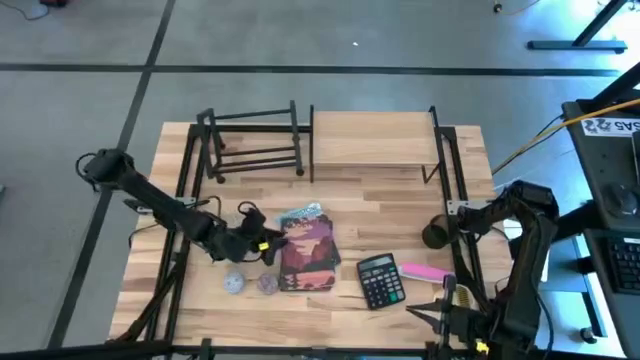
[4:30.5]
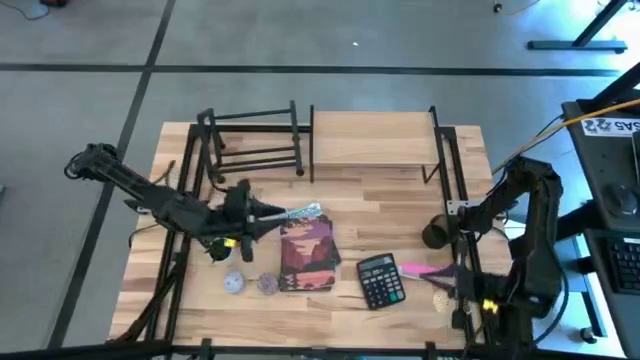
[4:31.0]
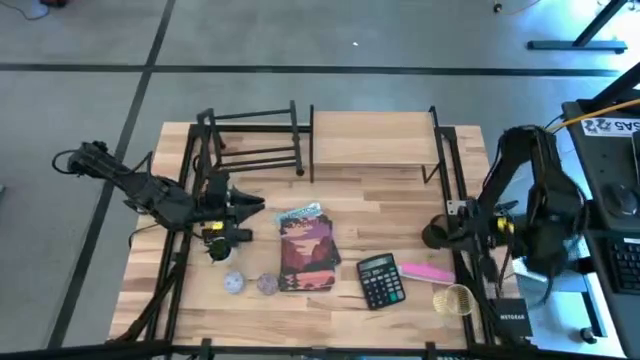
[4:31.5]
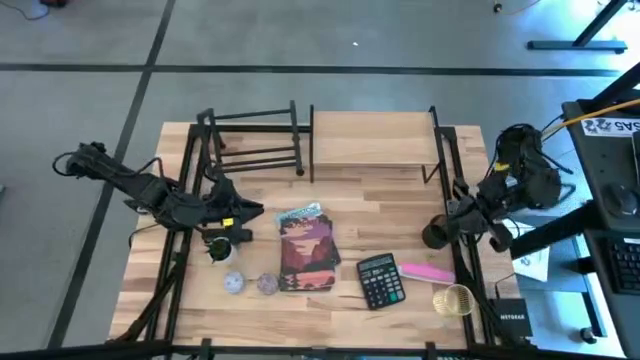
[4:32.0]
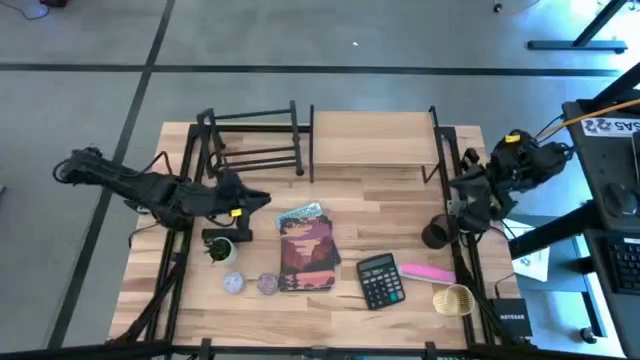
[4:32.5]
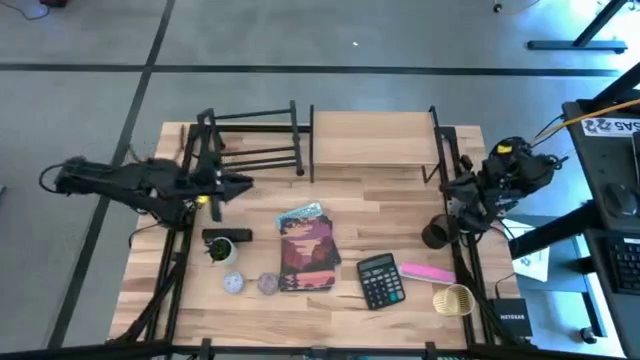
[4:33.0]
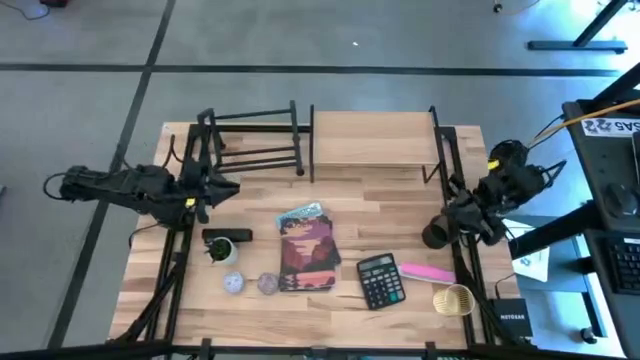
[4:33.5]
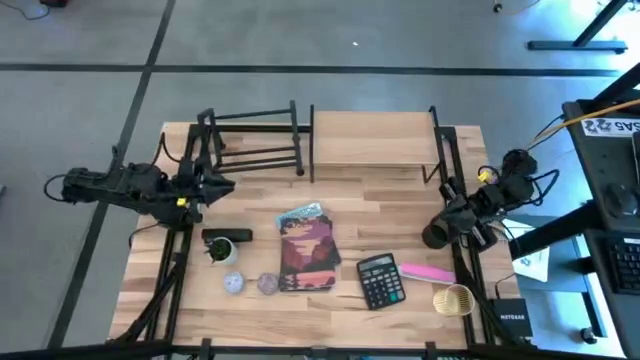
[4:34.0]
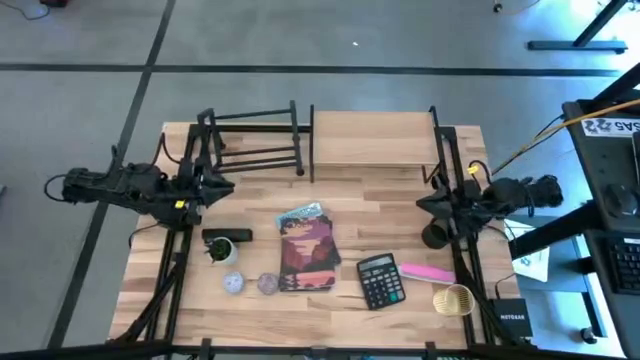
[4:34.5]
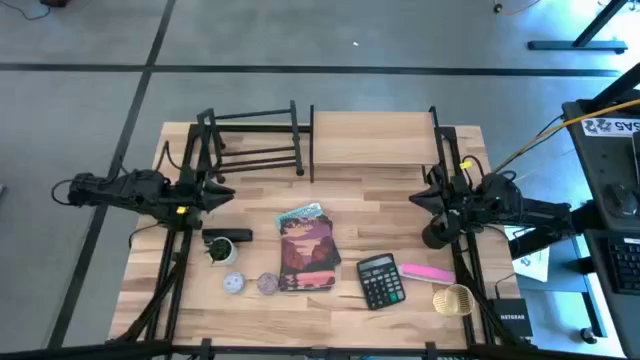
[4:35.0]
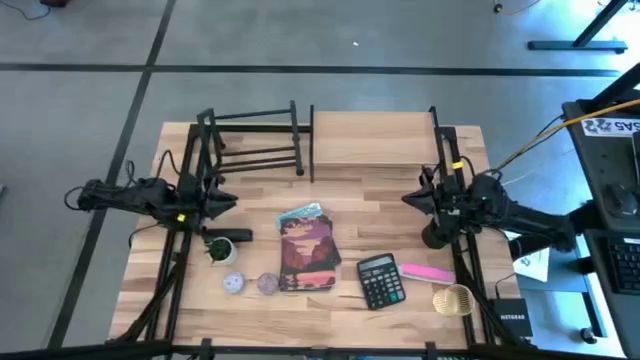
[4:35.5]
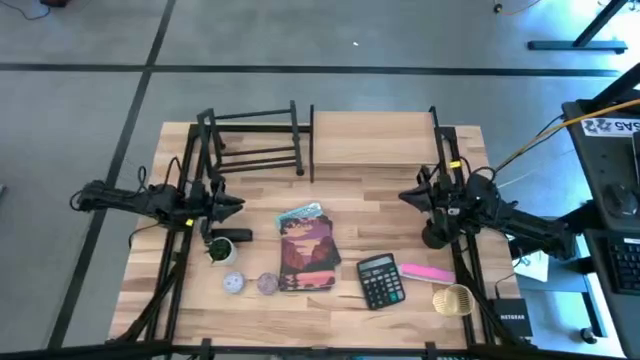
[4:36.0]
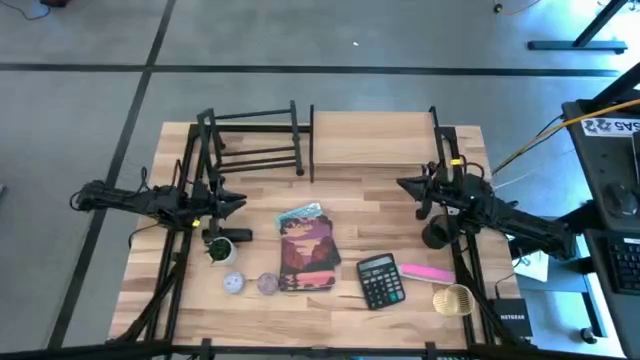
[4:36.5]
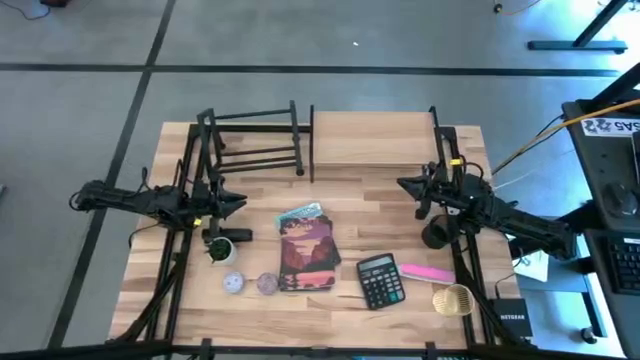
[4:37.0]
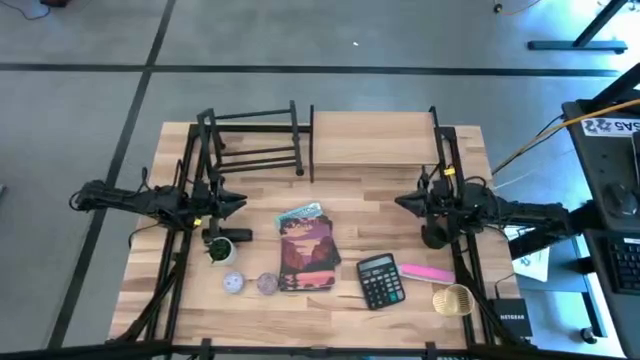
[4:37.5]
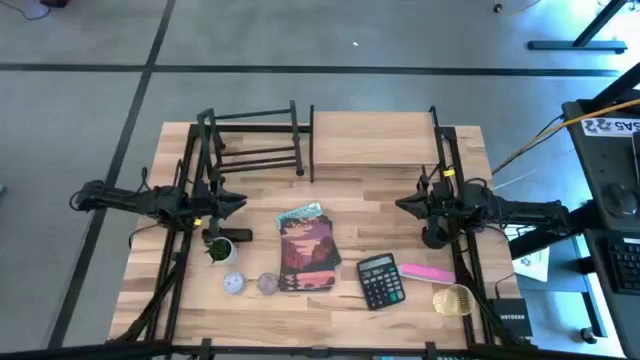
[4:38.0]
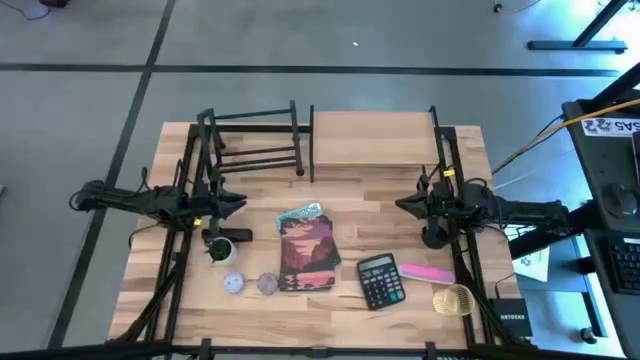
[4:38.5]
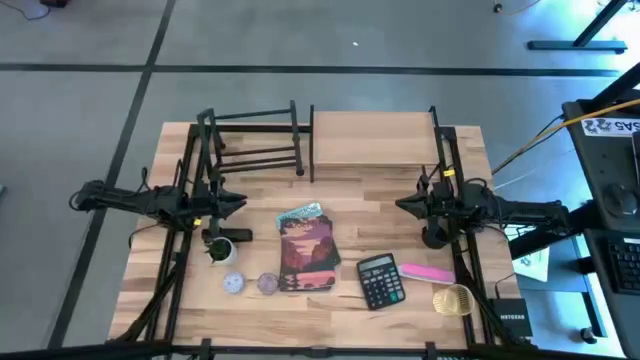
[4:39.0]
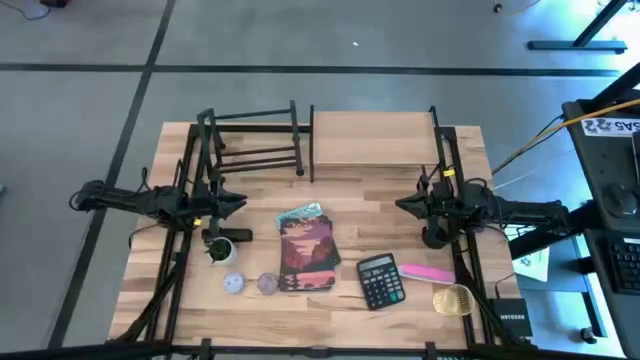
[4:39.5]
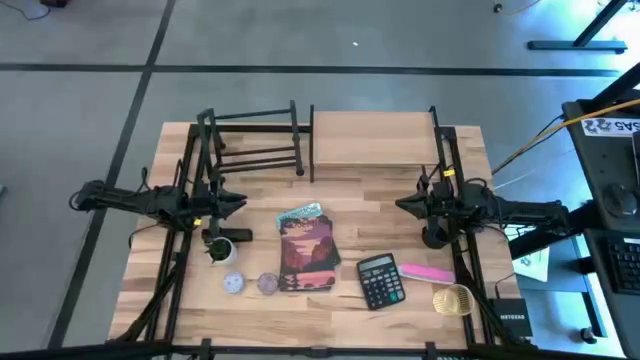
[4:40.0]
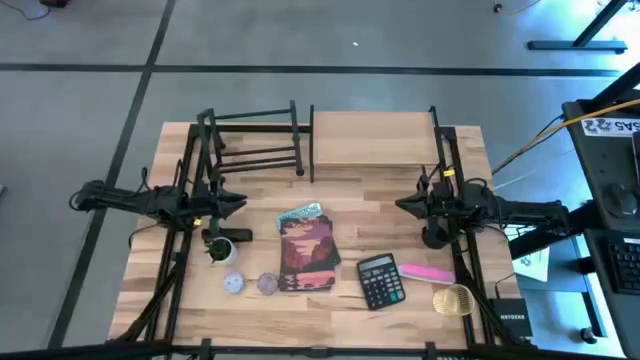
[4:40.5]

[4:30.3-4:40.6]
Task: Stock shelves
Return to Home Position

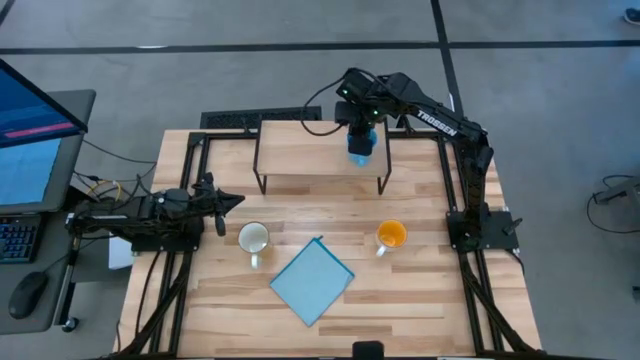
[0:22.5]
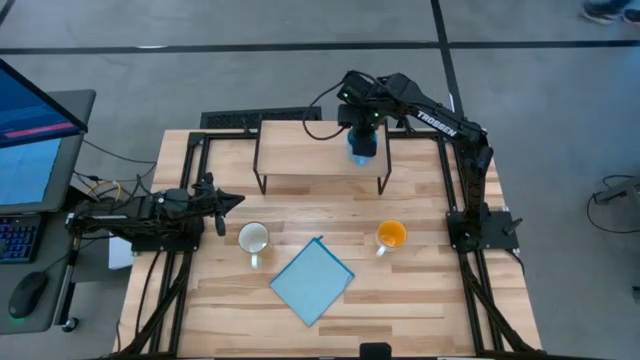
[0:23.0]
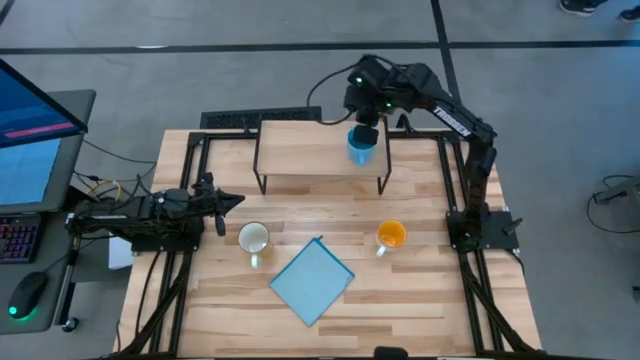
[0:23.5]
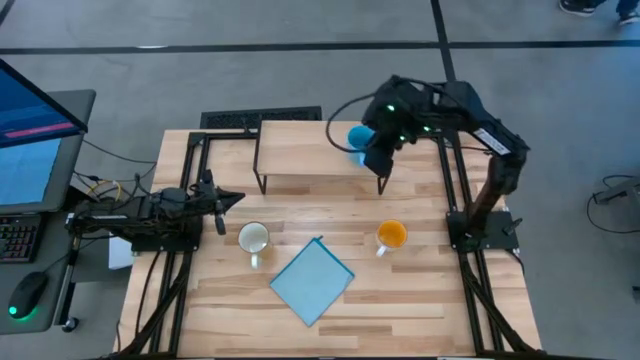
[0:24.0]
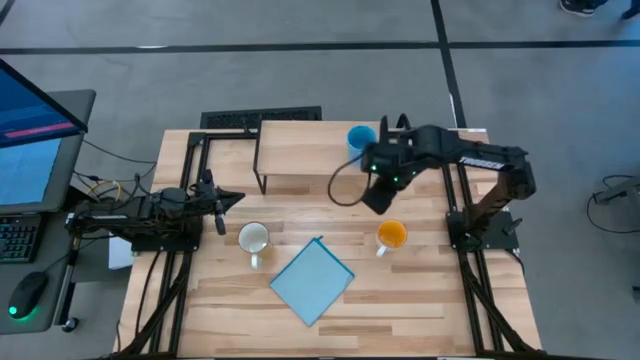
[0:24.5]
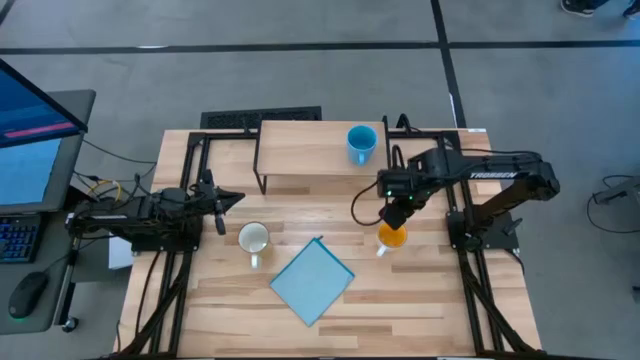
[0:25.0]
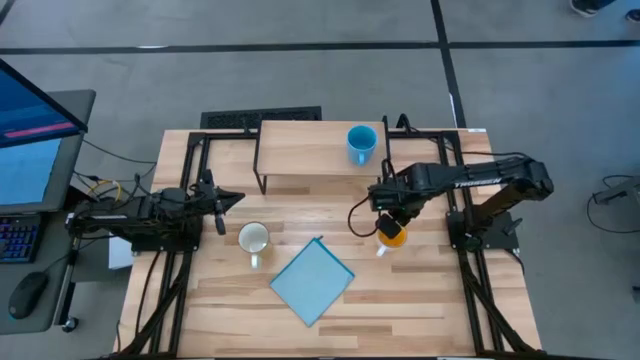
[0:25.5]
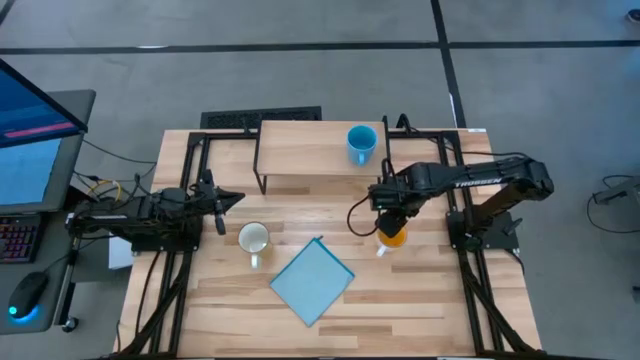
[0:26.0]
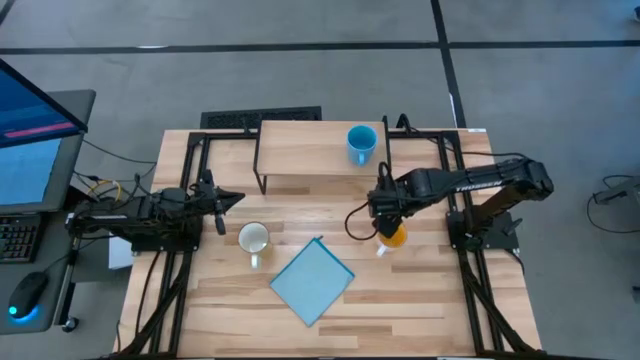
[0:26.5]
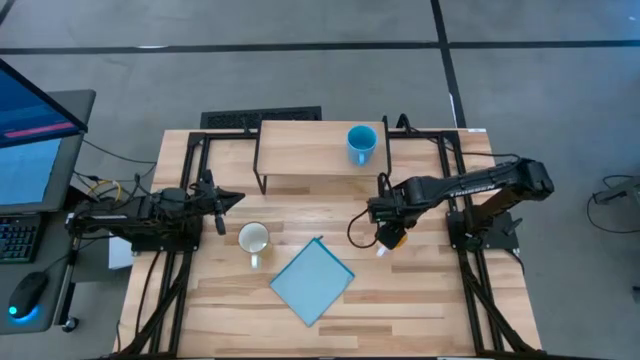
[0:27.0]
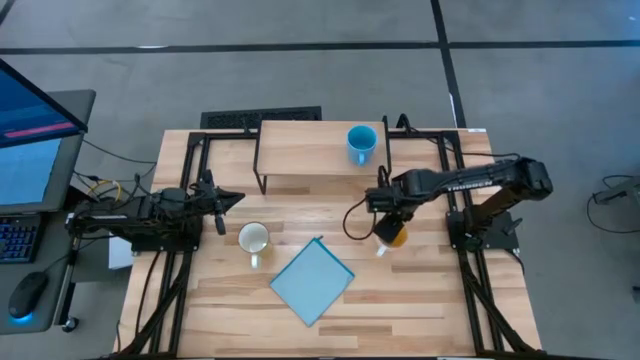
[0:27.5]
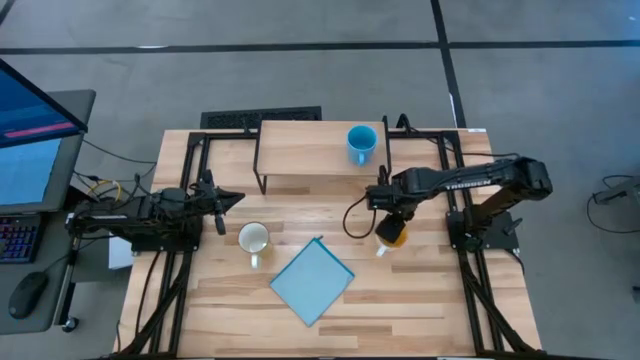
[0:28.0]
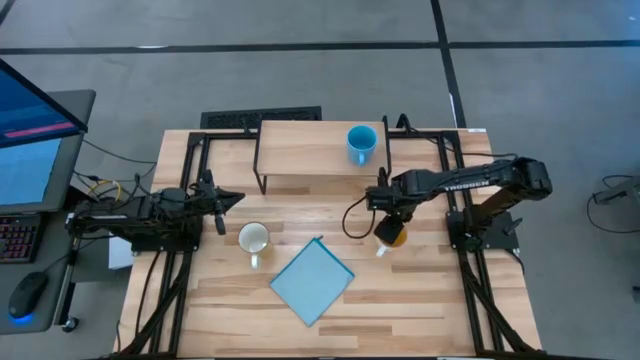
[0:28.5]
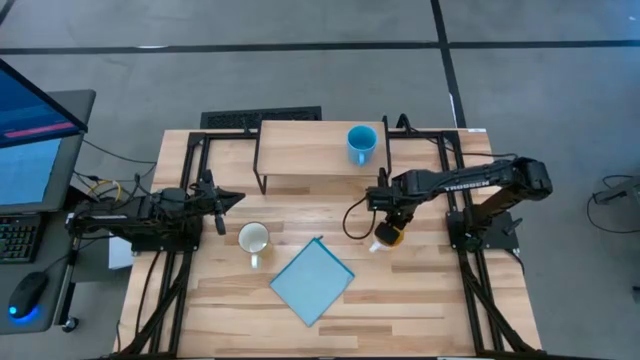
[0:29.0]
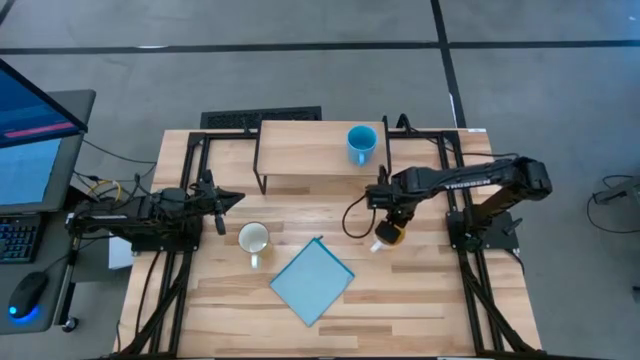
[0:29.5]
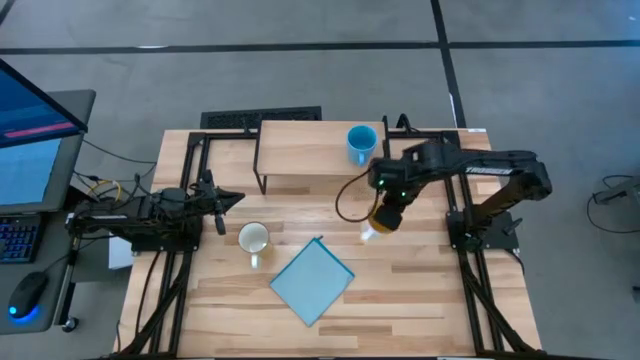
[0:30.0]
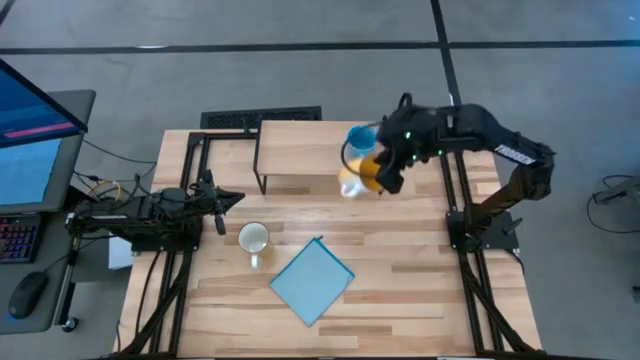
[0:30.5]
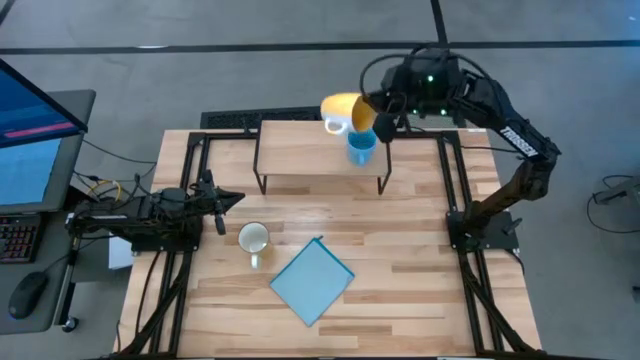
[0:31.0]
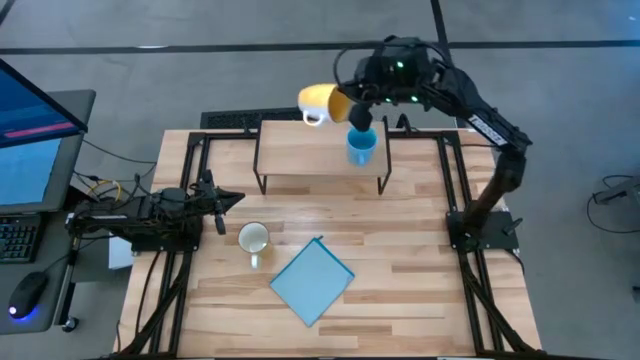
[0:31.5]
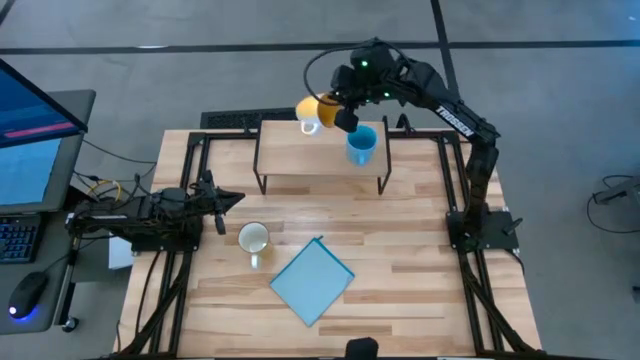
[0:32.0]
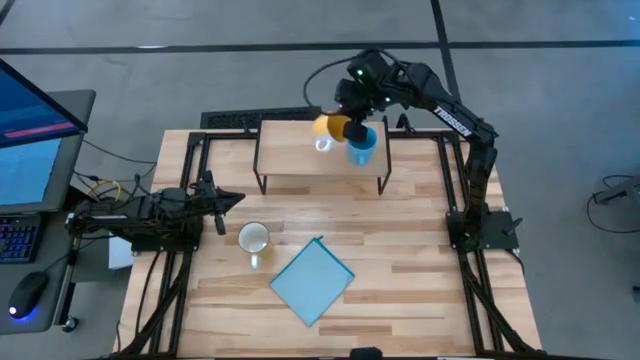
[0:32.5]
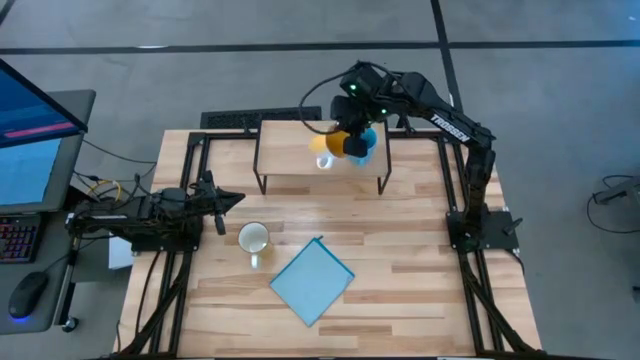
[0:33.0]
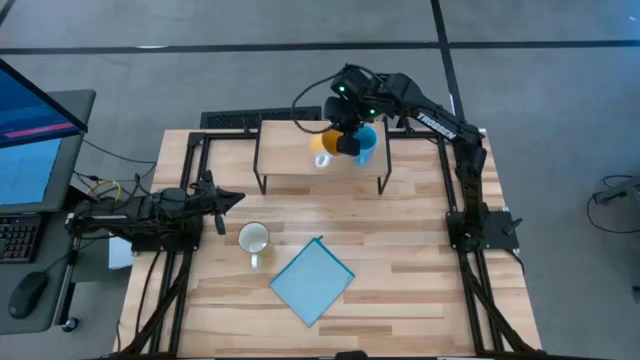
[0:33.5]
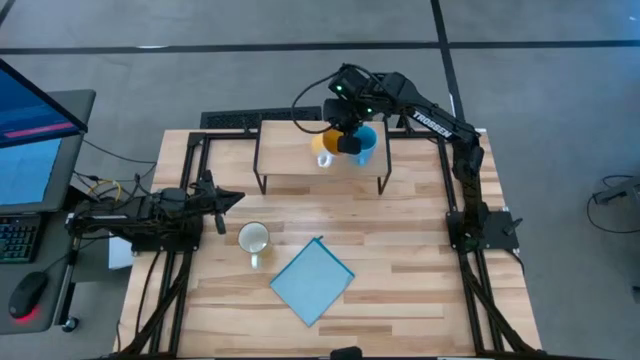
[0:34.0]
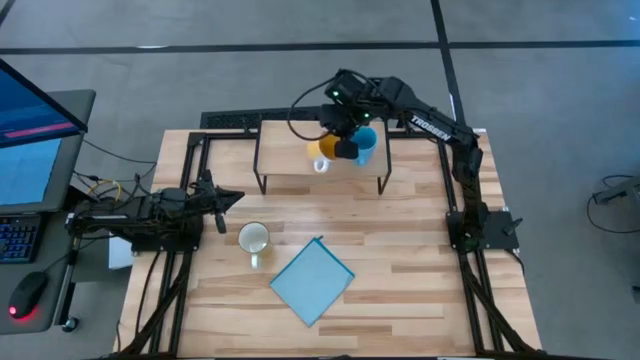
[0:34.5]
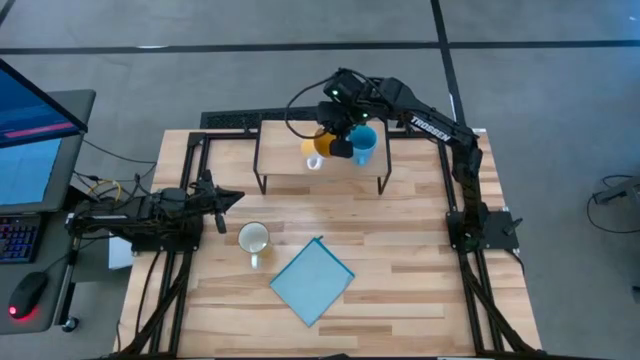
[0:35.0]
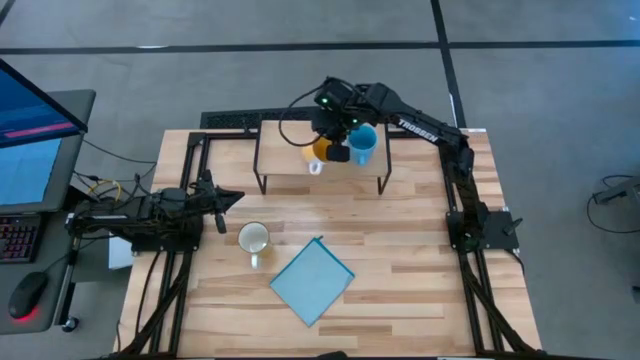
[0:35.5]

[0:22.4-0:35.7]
Task: Stack small to large cups/mugs on shelf
Put the yellow mug on the shelf
